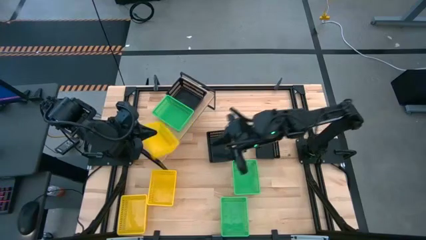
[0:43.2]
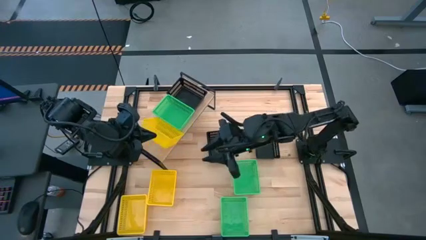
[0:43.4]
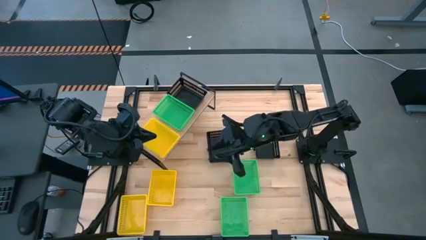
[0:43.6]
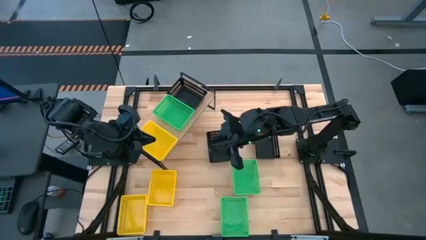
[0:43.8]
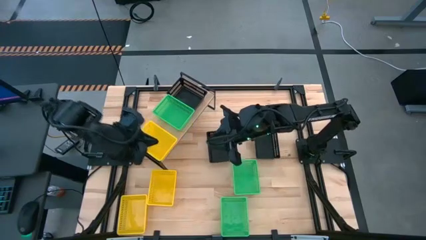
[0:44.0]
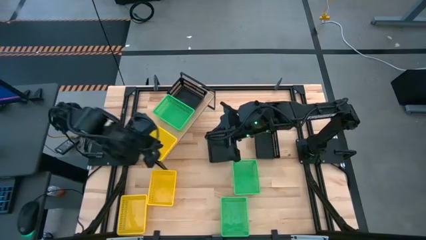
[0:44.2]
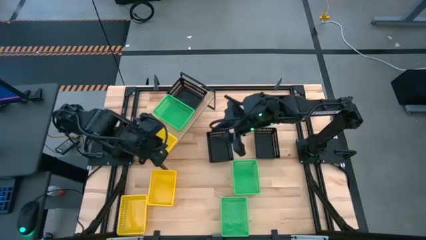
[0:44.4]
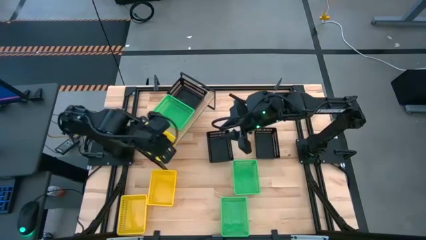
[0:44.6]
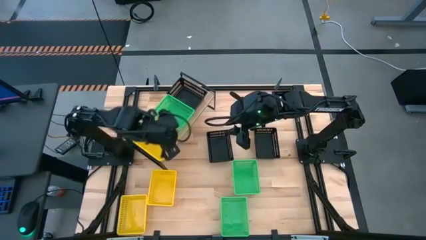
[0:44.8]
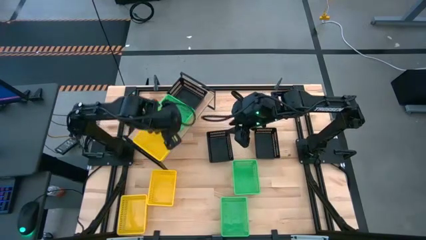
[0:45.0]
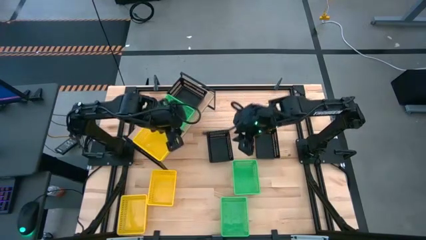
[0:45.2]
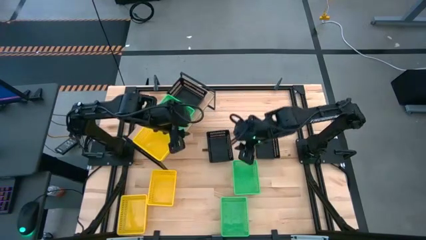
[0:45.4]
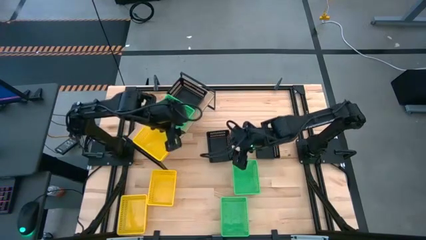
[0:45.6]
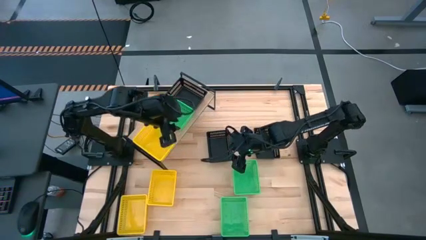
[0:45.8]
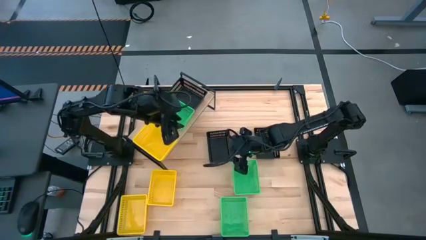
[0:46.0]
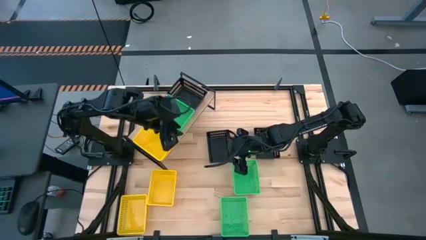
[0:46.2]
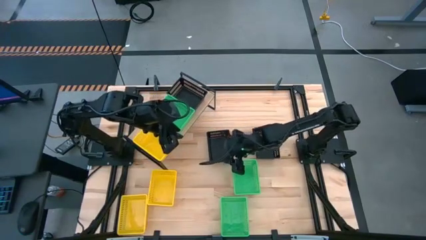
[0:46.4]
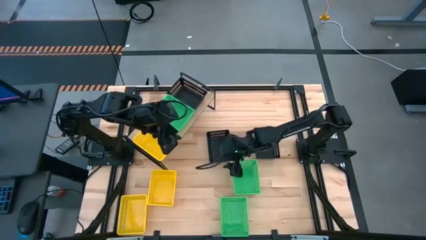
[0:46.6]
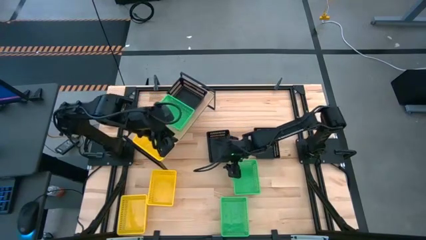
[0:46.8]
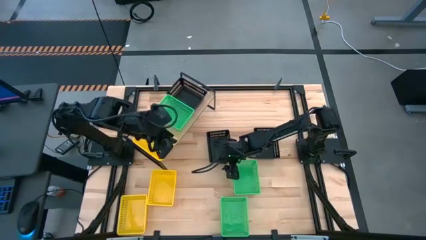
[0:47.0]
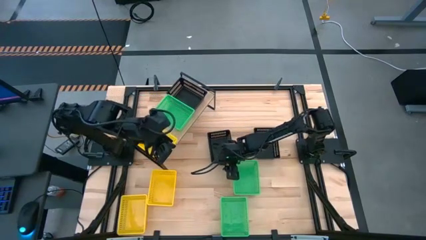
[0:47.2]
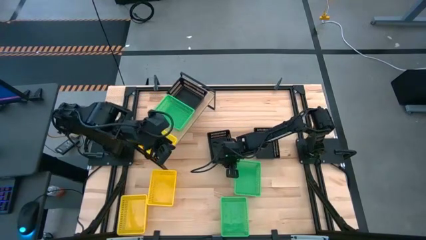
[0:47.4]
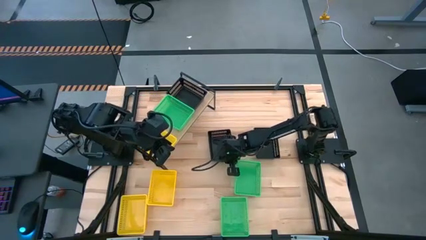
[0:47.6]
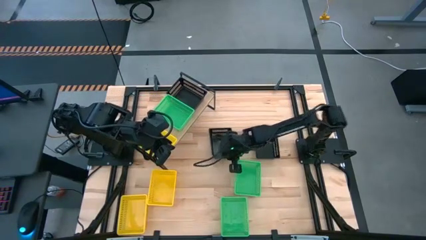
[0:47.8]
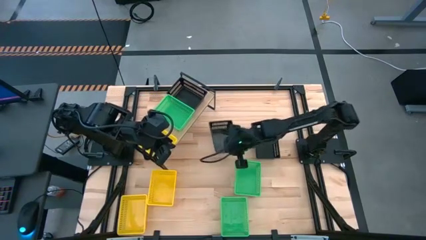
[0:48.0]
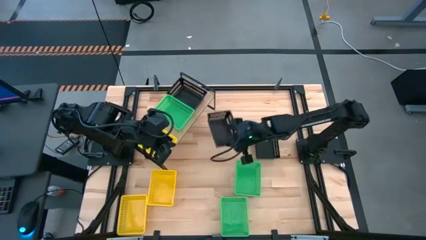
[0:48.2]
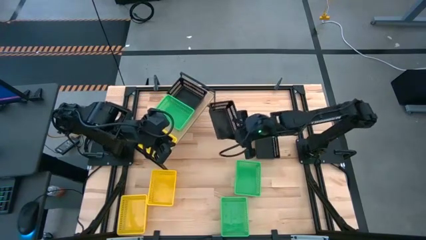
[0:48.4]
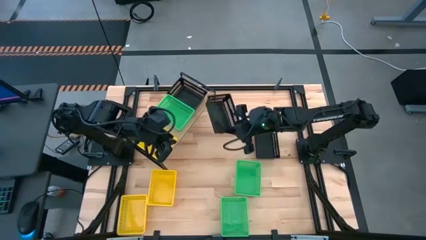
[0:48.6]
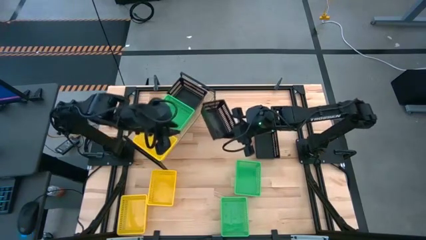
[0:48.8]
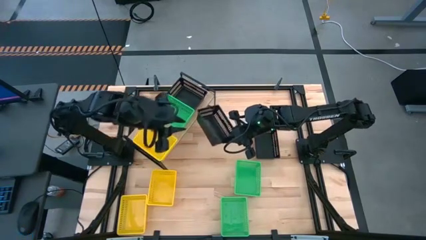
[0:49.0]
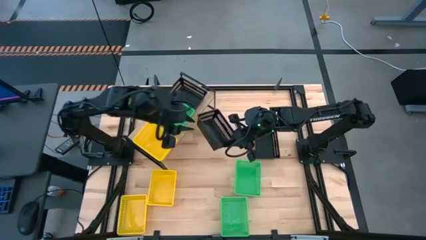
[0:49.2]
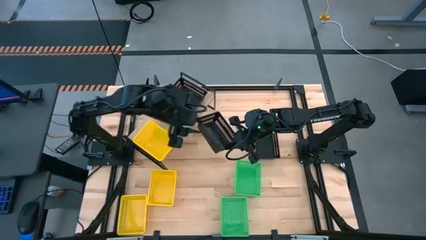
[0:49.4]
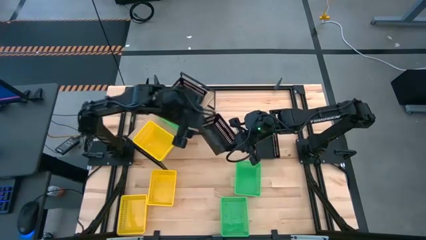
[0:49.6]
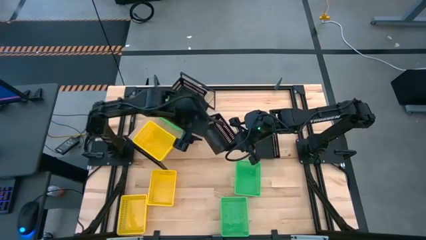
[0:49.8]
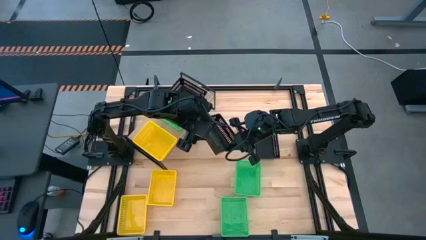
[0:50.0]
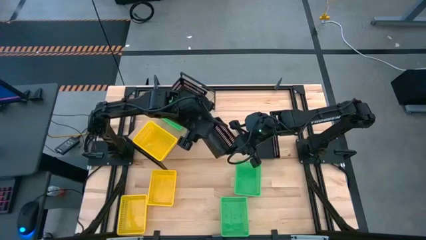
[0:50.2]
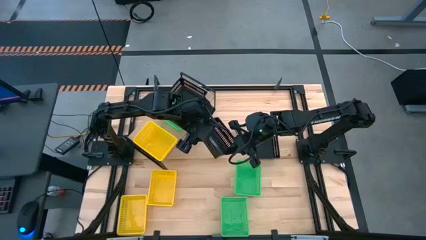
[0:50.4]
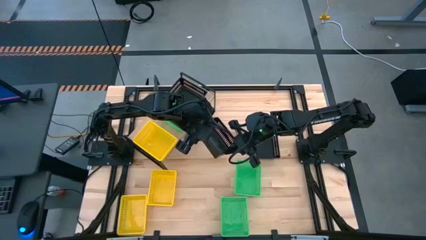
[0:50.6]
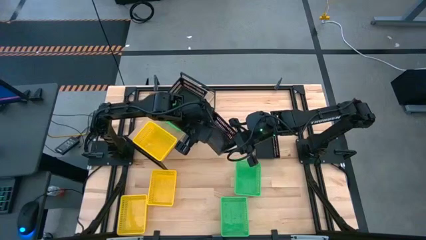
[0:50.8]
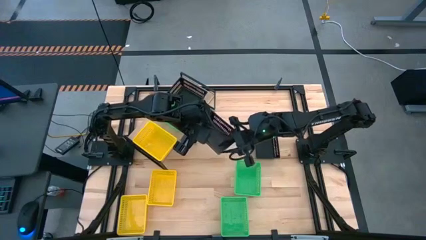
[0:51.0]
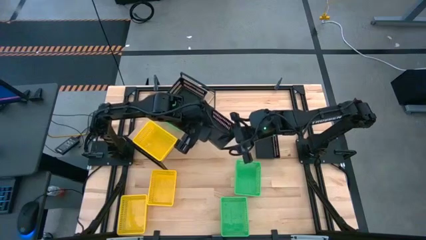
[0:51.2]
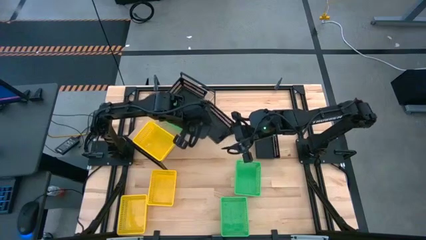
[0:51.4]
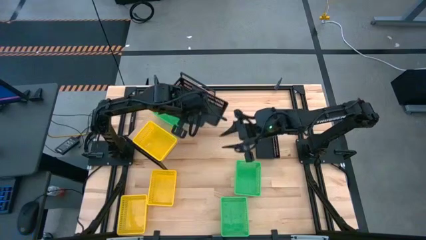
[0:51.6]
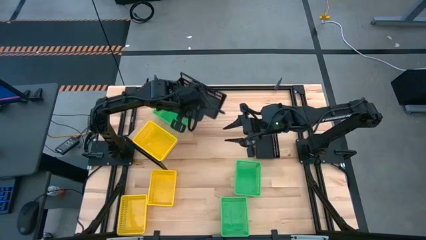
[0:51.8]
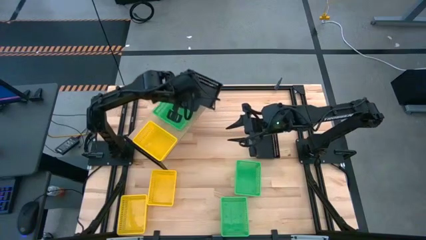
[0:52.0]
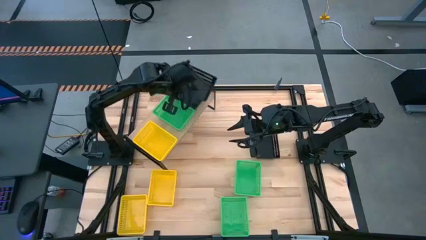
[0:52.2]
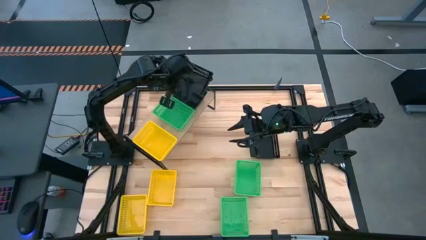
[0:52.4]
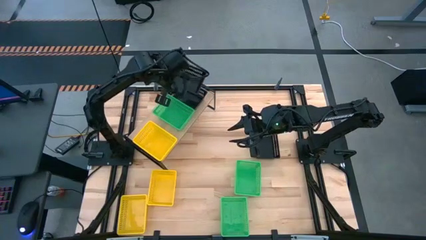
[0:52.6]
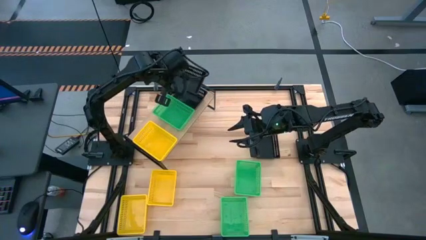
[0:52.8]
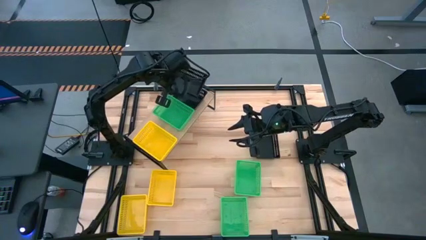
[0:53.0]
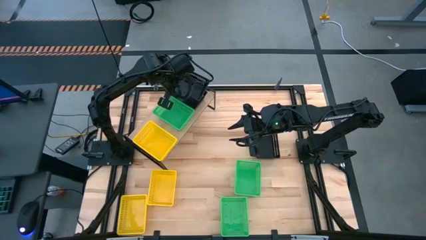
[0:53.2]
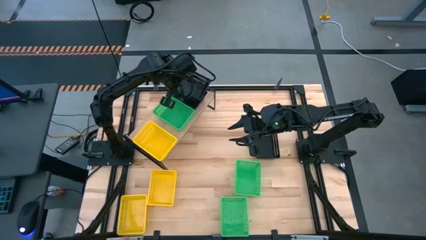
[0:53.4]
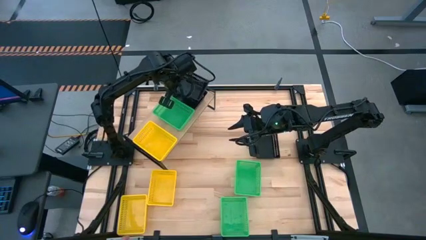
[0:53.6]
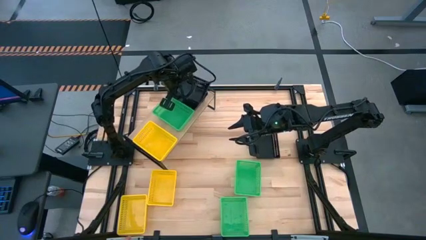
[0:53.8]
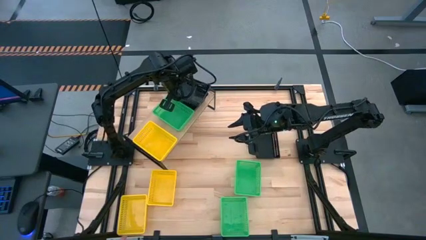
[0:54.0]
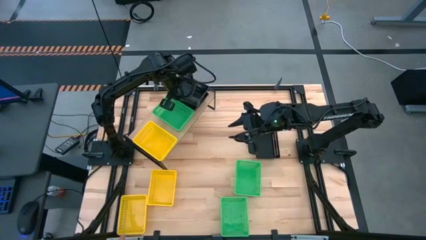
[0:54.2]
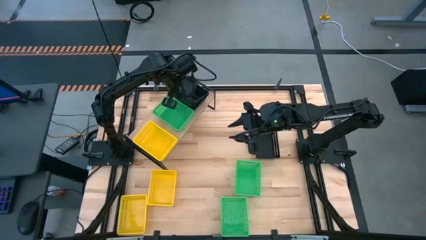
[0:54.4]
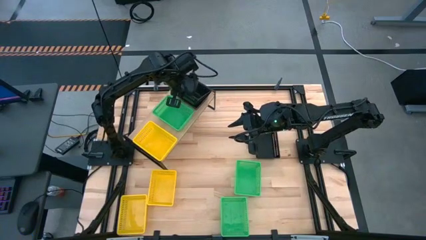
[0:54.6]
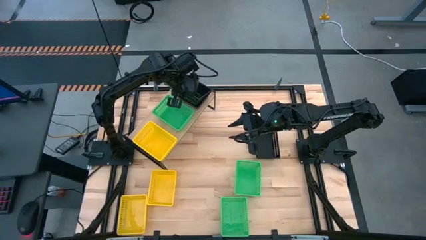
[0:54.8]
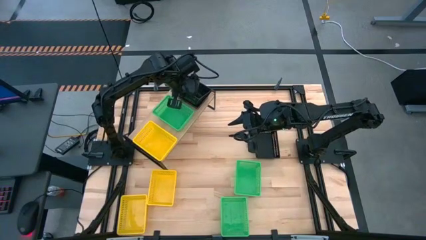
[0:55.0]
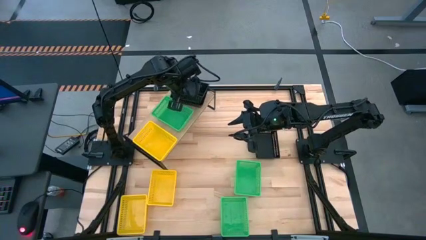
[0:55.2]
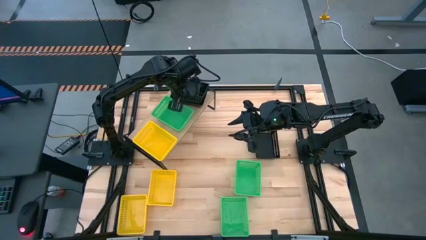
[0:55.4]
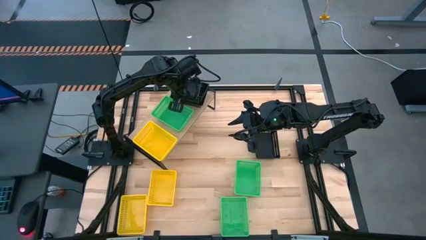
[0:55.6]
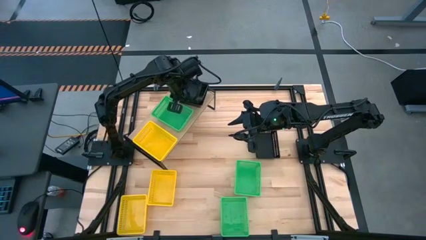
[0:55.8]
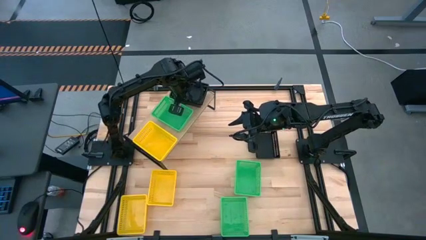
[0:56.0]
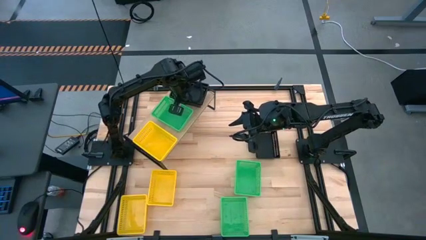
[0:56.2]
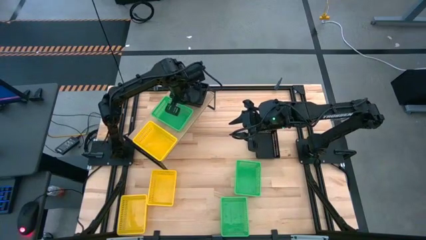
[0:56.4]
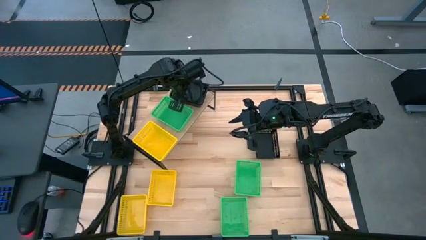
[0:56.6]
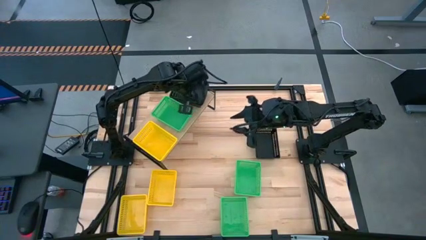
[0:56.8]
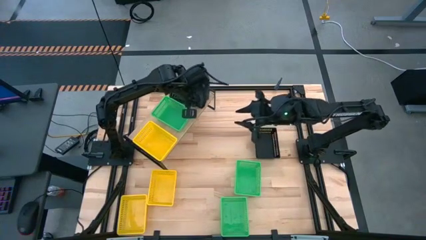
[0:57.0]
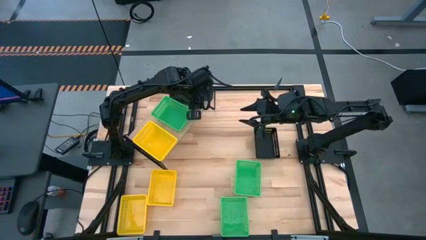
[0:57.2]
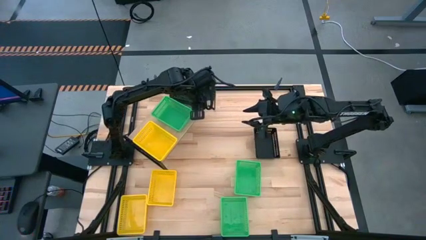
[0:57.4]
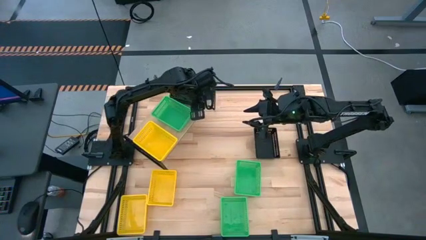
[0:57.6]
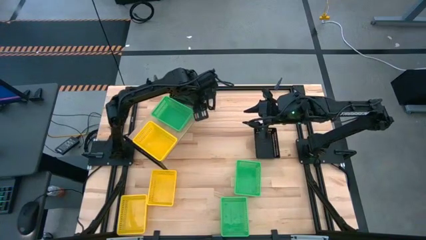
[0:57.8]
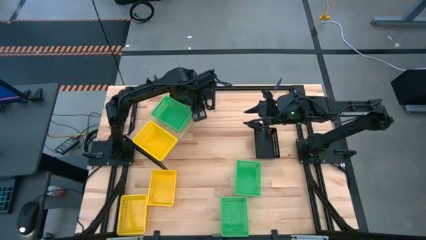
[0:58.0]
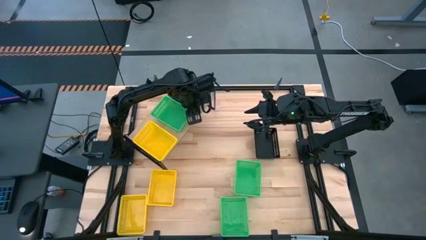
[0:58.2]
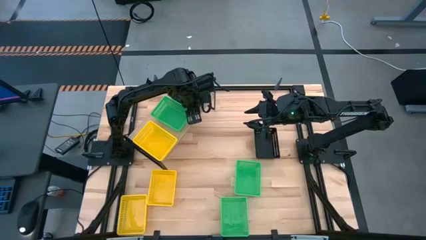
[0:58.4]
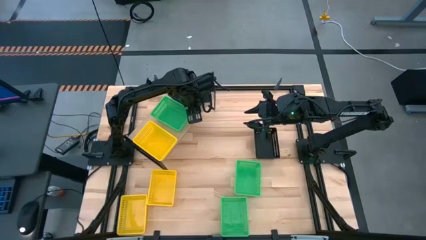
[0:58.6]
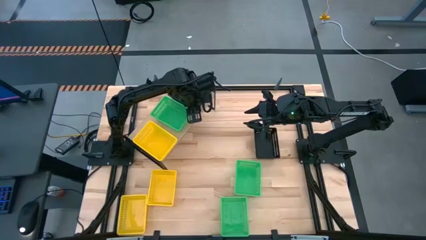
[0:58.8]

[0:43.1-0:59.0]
Task: Stack baskets on shelf by color
Stack the left black bin on top of the other black bin on the shelf
